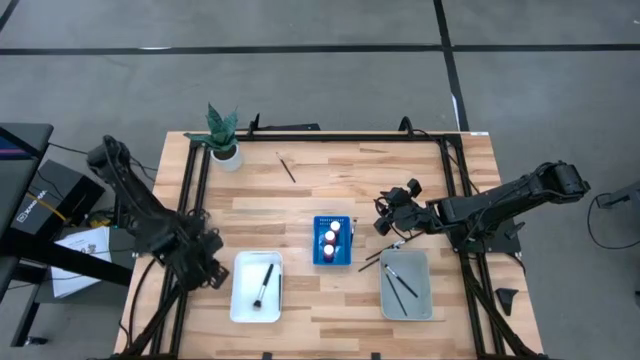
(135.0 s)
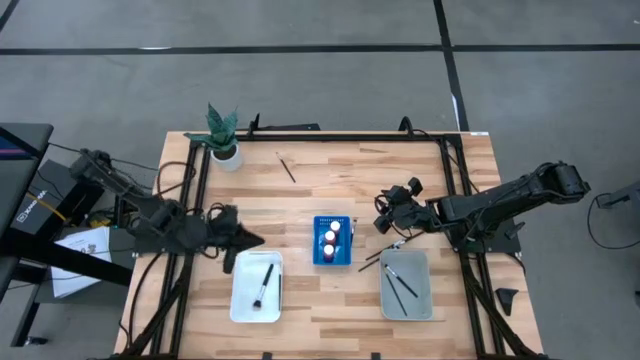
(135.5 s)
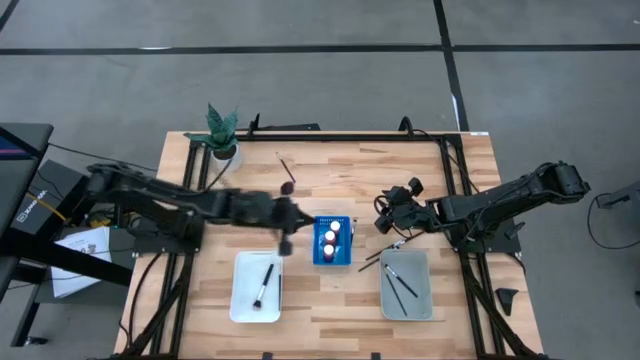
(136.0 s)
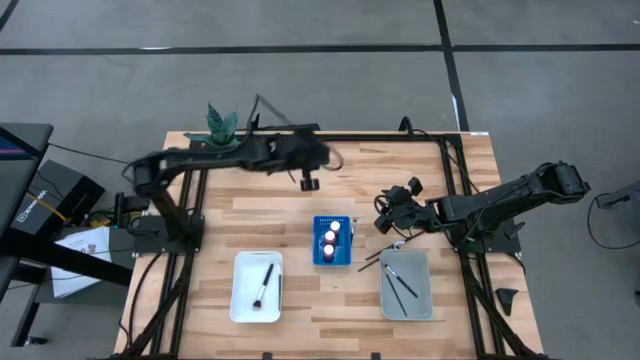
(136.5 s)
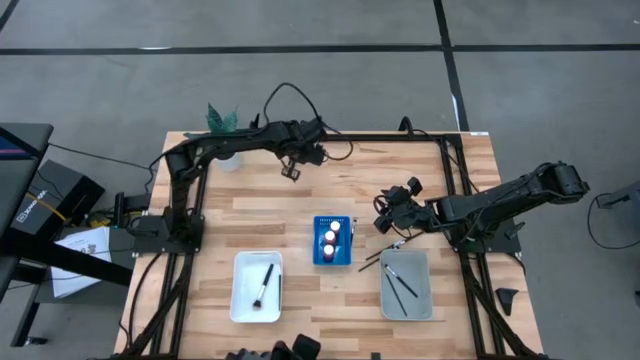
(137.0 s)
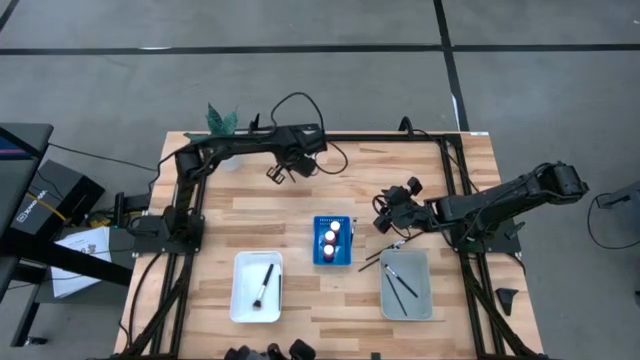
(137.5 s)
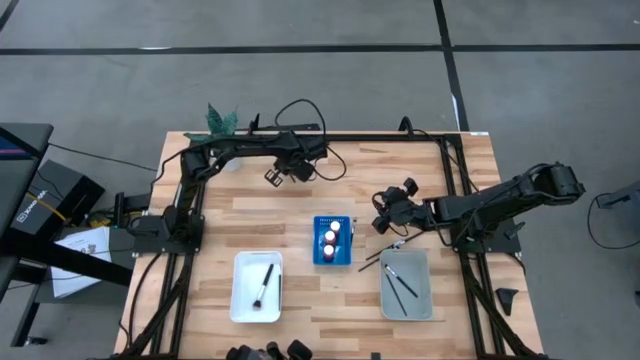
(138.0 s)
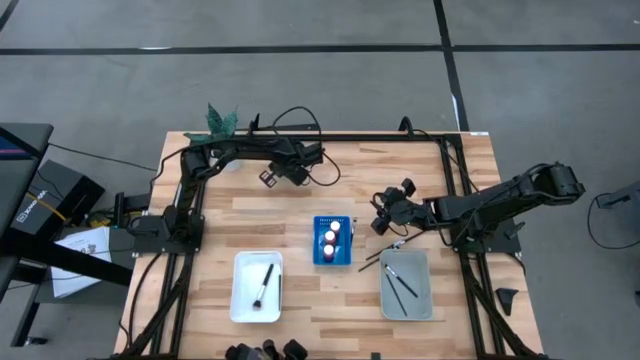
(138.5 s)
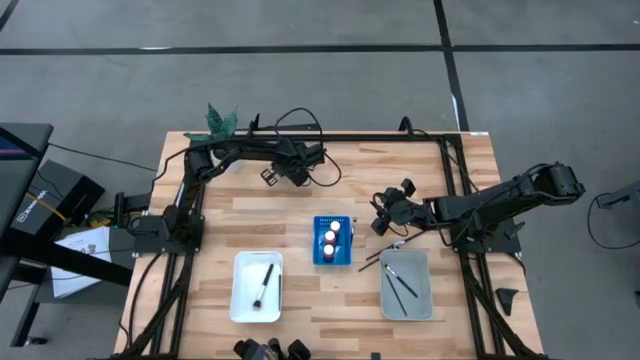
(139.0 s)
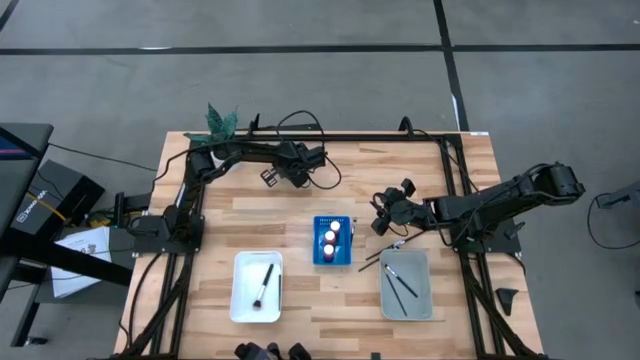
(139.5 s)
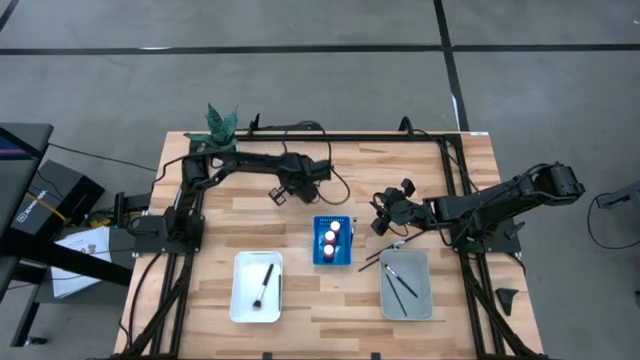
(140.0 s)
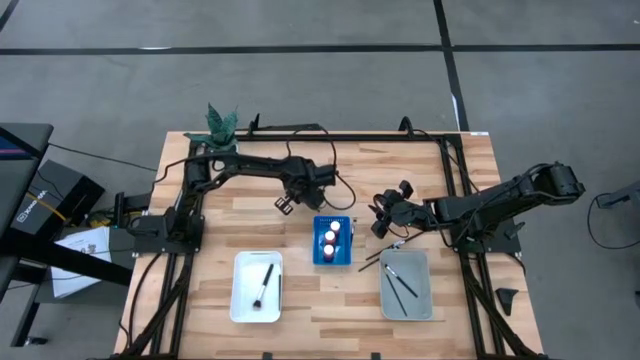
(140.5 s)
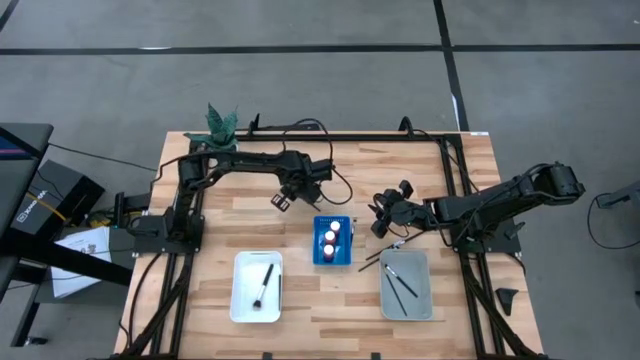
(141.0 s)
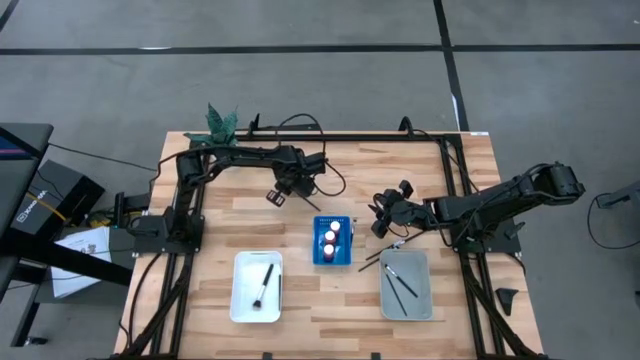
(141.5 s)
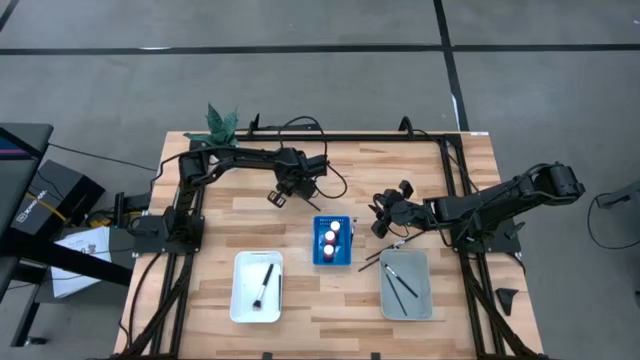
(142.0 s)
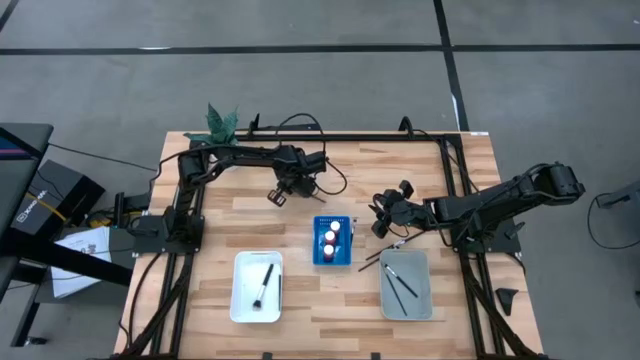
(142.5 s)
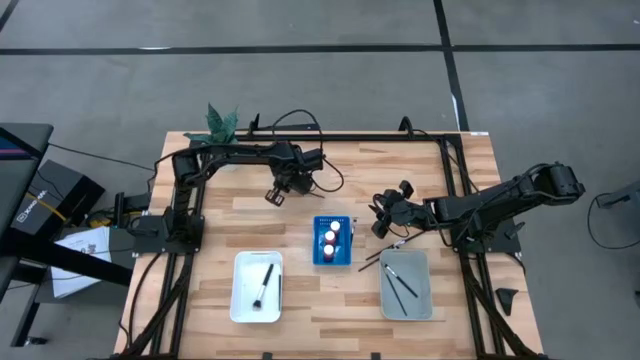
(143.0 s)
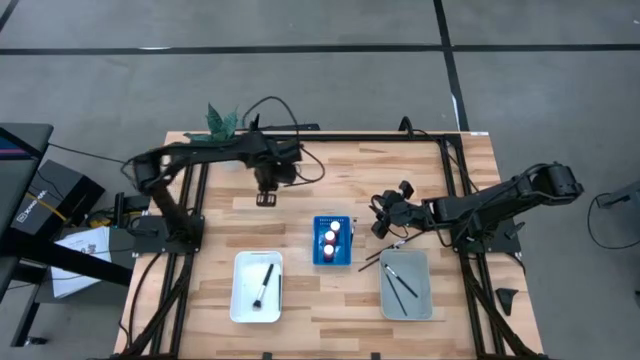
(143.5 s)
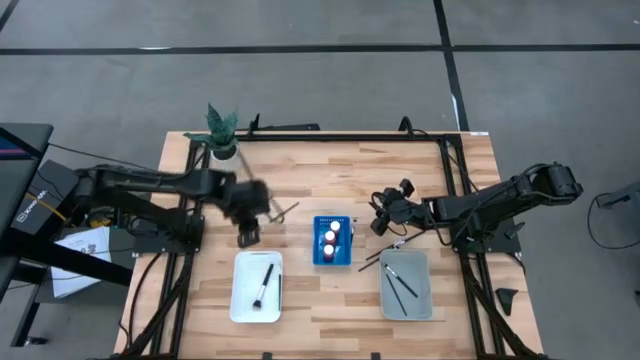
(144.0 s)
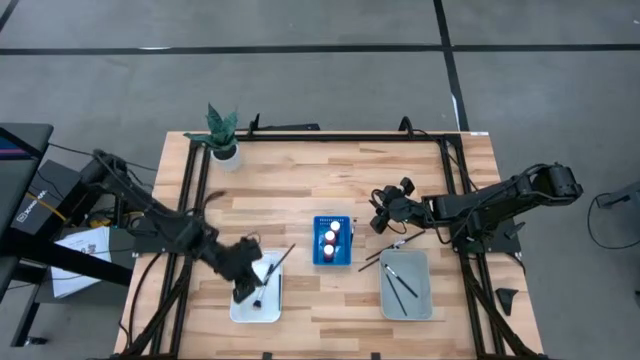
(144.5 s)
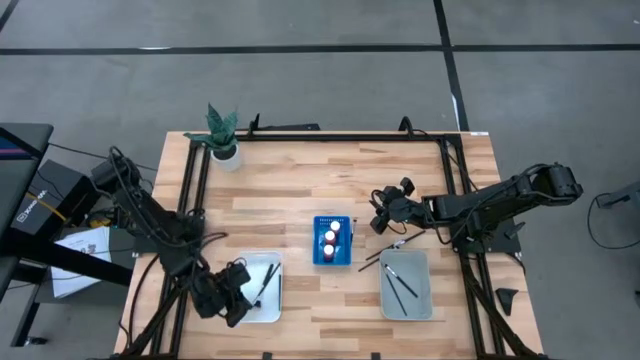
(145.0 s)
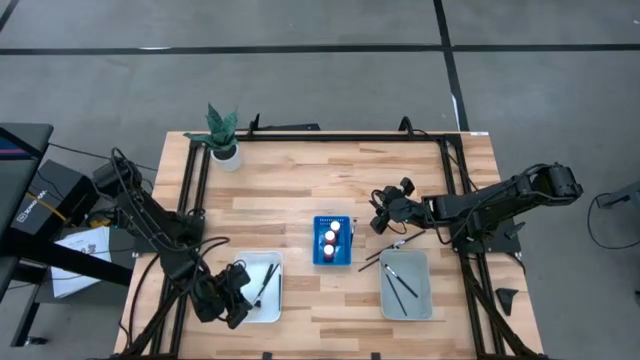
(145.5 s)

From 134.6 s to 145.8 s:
Task: Pick & Place Paint Supplies
Put the paint brush into the white bin

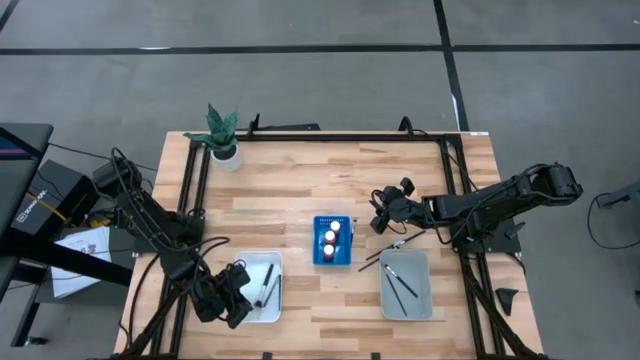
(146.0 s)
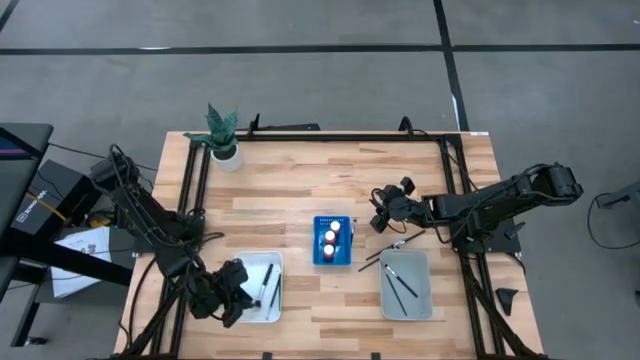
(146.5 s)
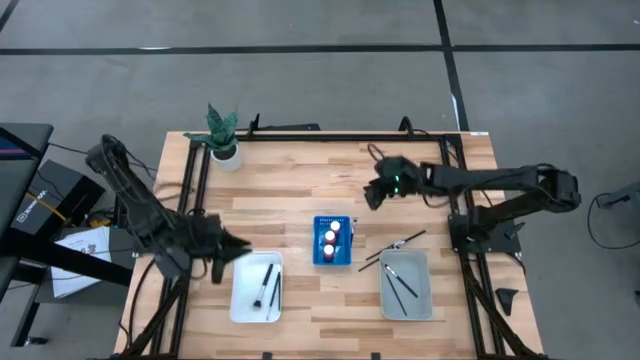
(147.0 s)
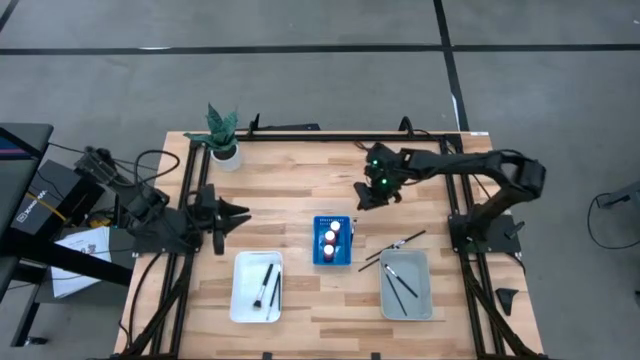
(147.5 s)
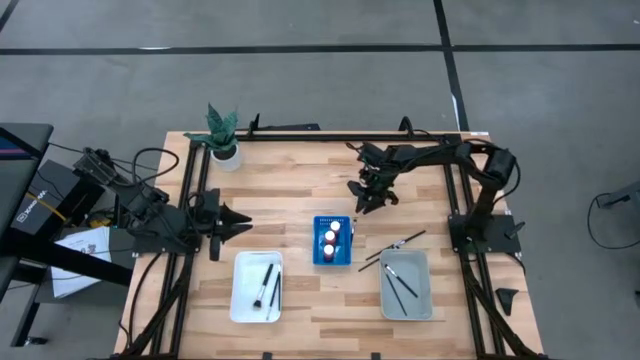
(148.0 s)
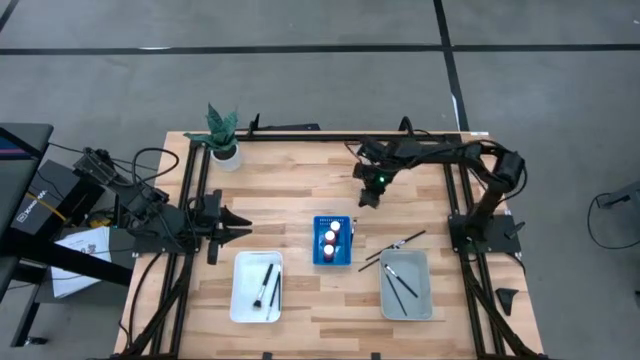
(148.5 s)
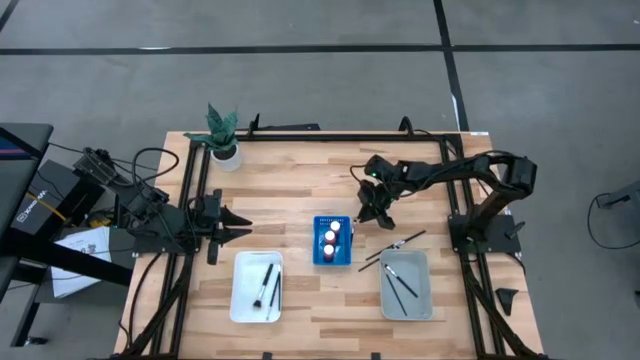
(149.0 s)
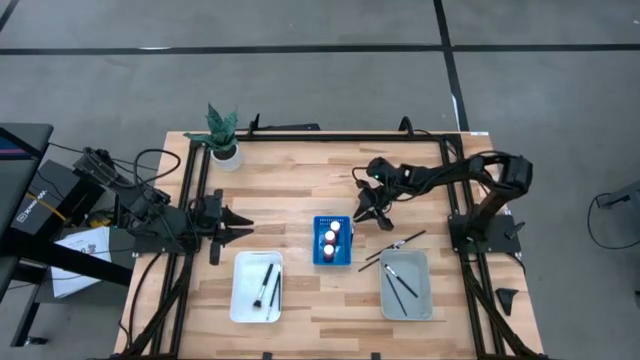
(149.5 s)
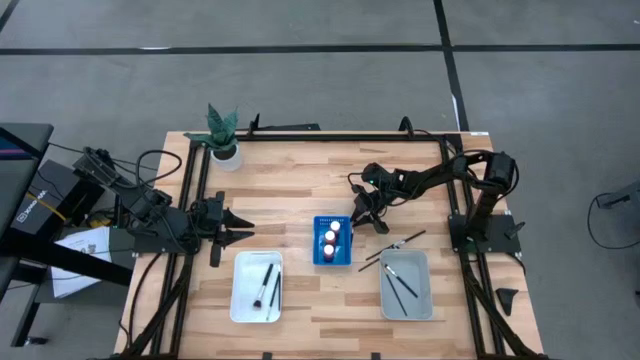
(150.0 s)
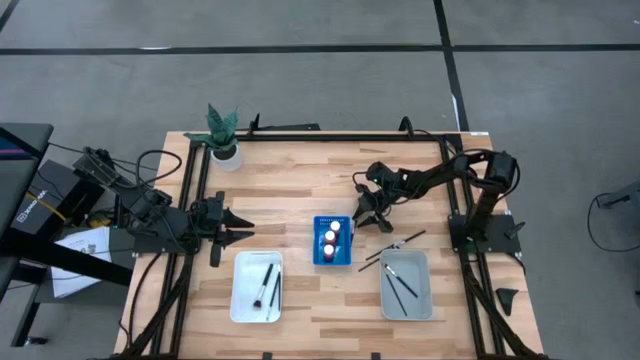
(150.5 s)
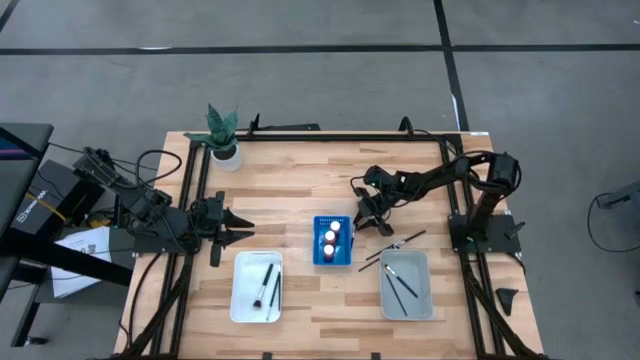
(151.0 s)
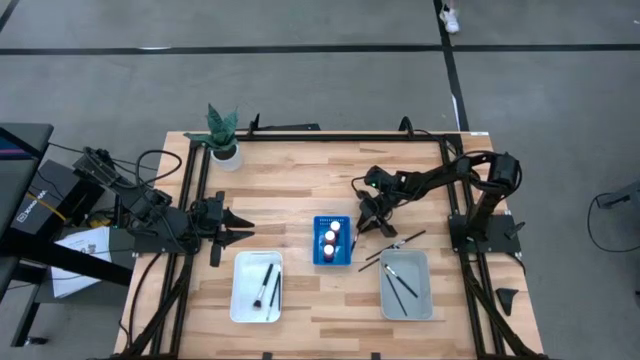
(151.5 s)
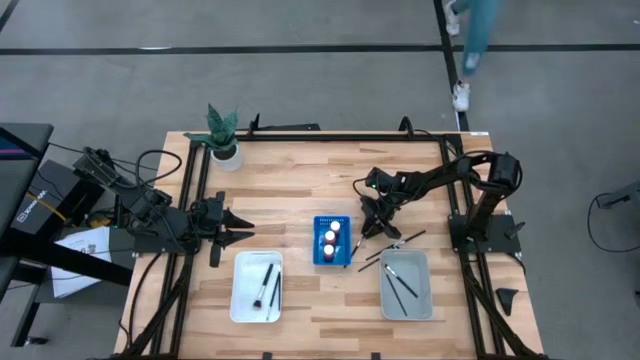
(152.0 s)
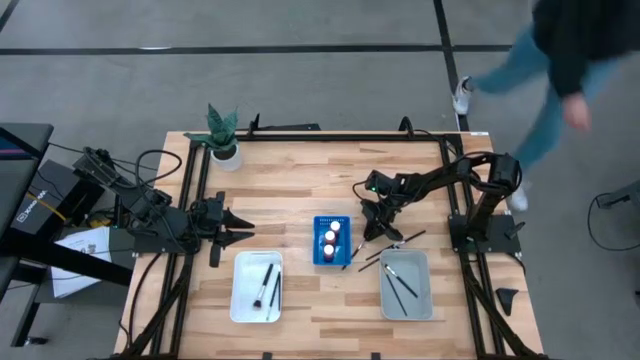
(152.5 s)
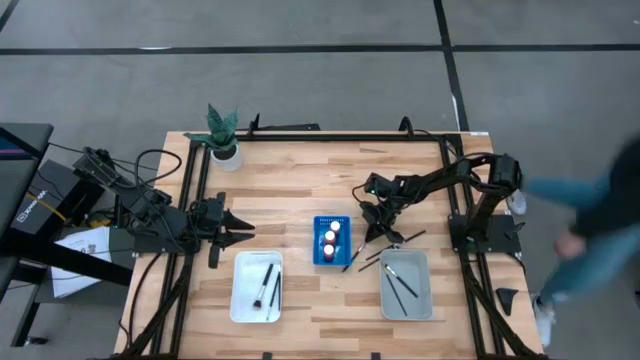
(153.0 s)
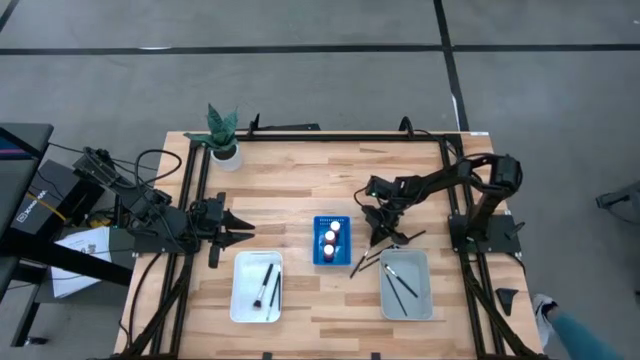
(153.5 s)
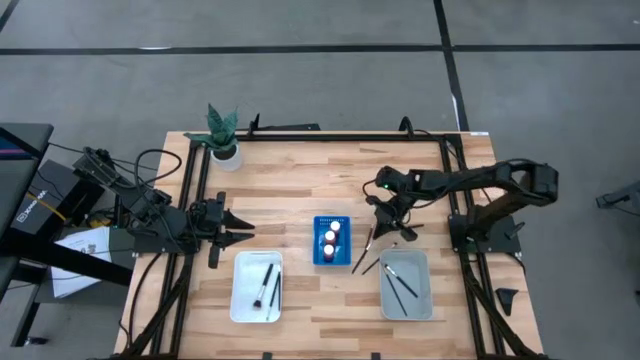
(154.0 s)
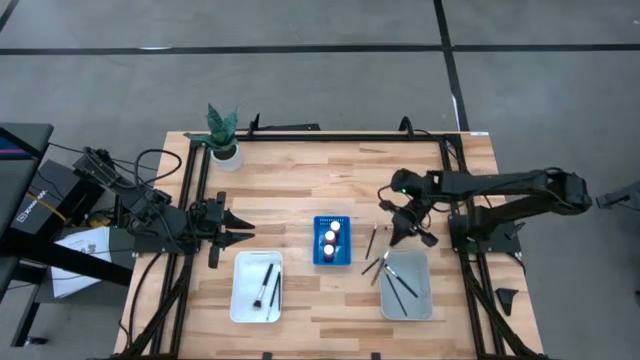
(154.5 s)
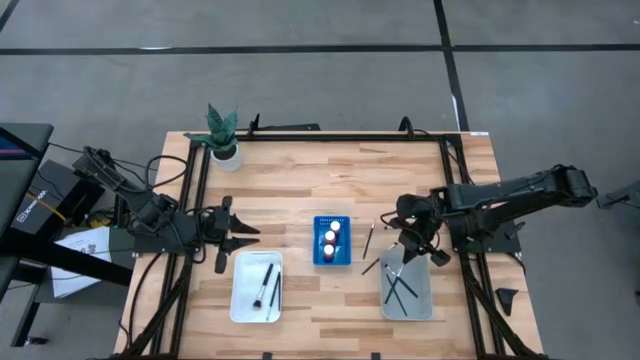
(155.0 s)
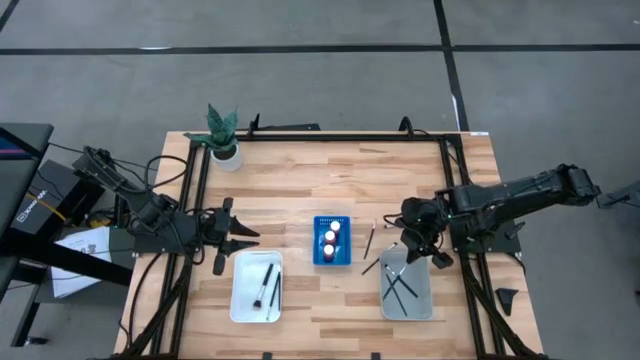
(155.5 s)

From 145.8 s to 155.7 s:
Put the top left eyeshadow brush into the gray bin
